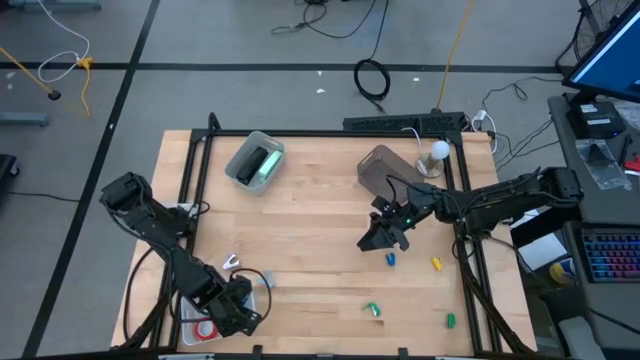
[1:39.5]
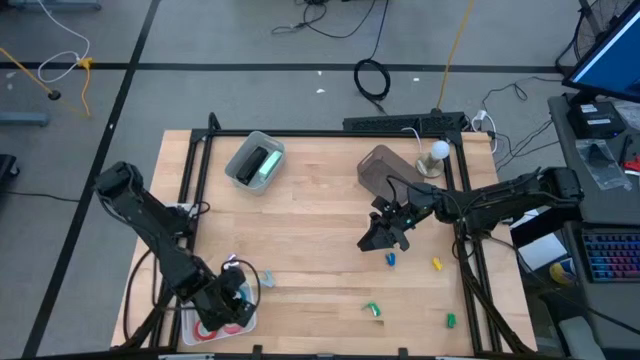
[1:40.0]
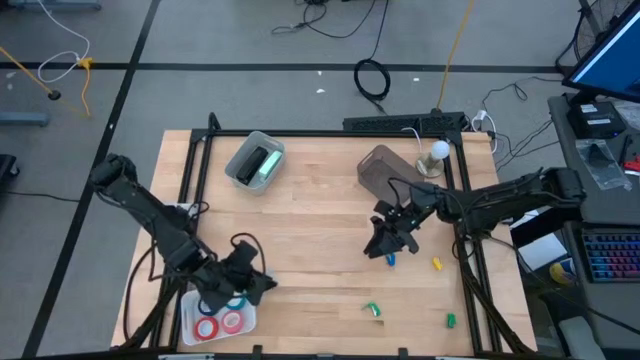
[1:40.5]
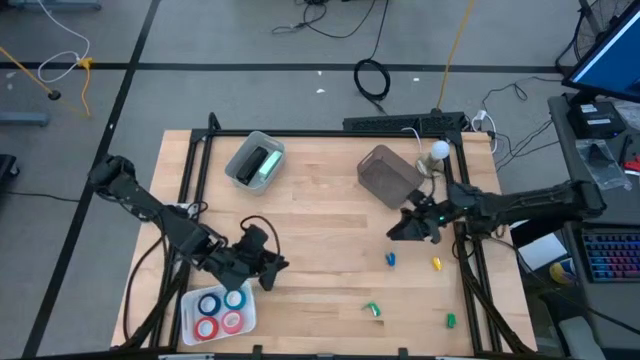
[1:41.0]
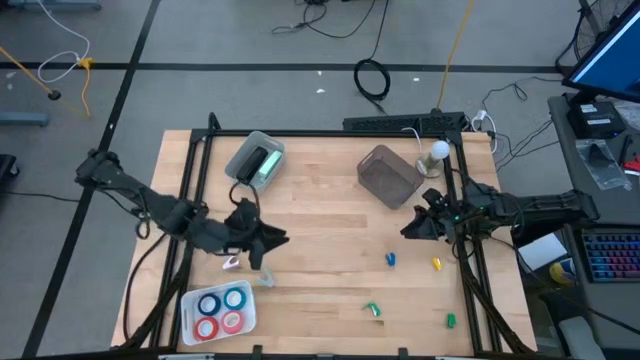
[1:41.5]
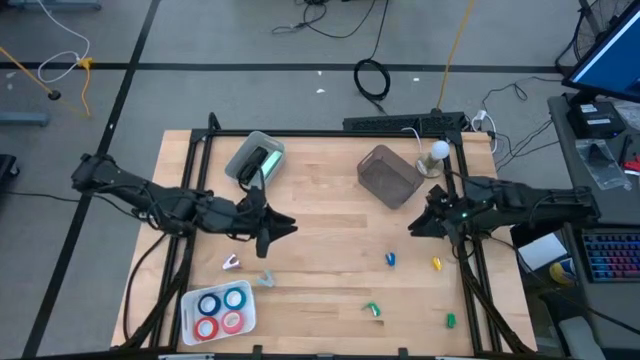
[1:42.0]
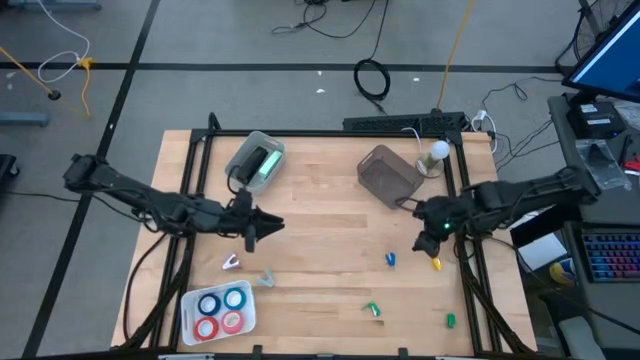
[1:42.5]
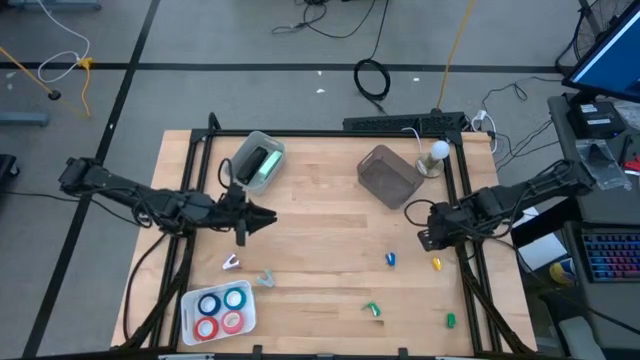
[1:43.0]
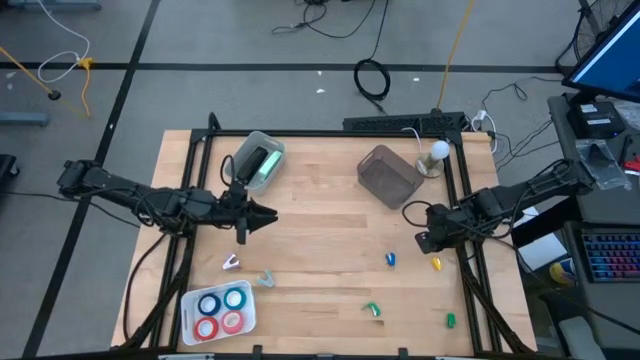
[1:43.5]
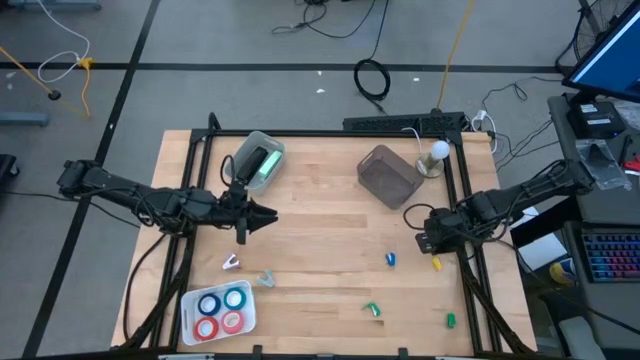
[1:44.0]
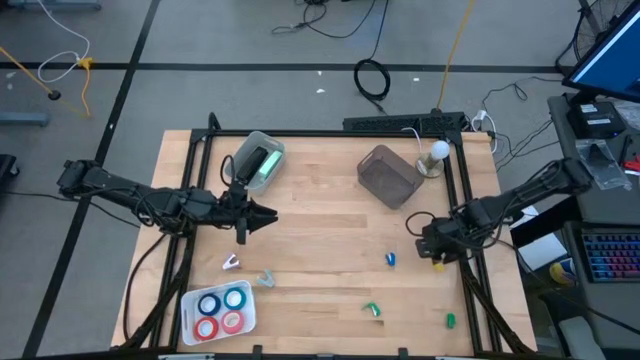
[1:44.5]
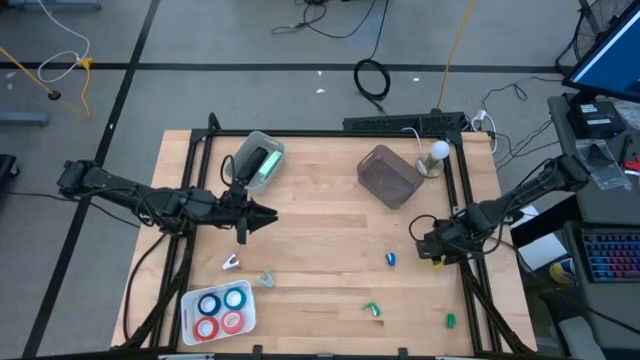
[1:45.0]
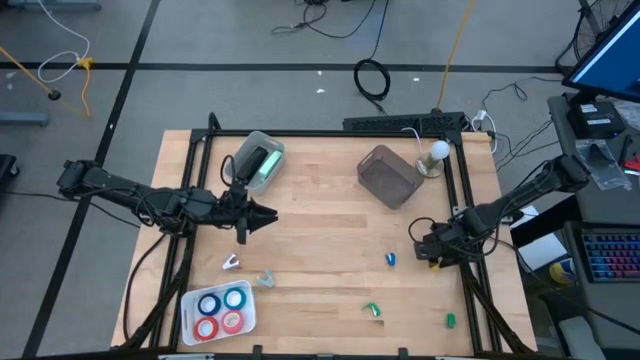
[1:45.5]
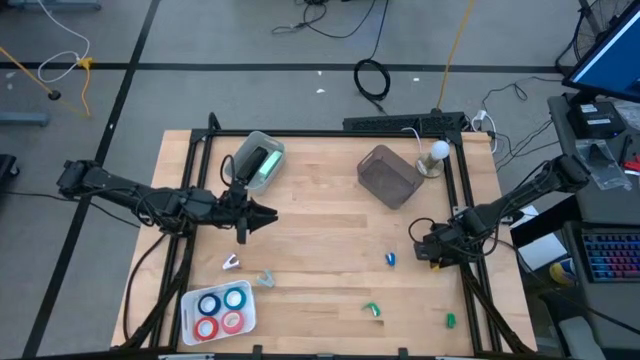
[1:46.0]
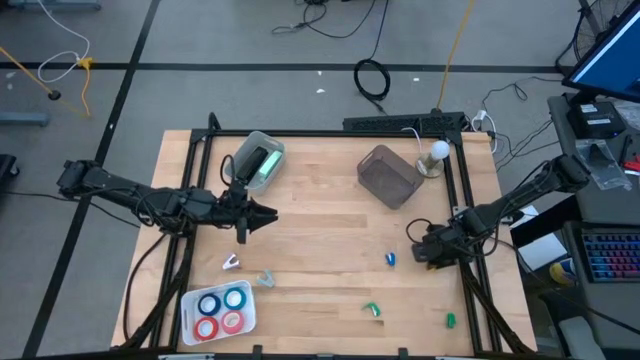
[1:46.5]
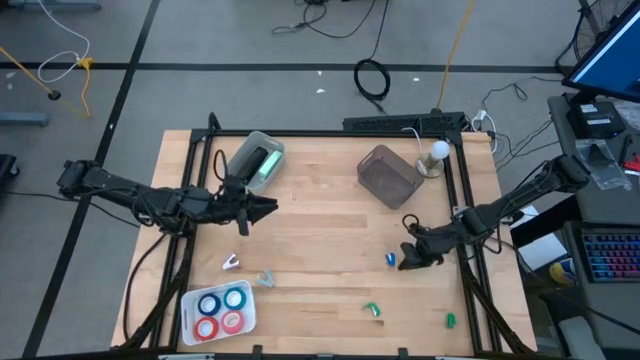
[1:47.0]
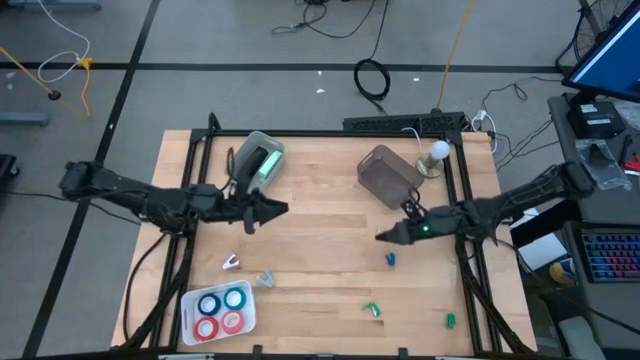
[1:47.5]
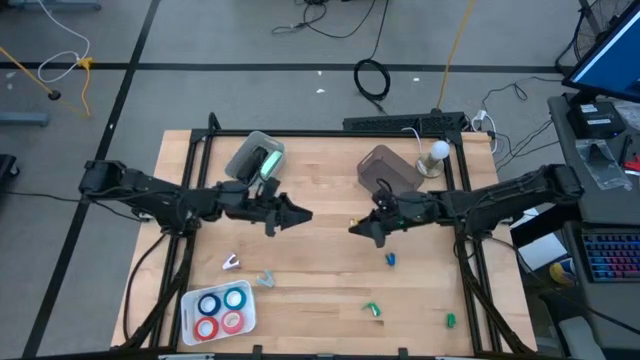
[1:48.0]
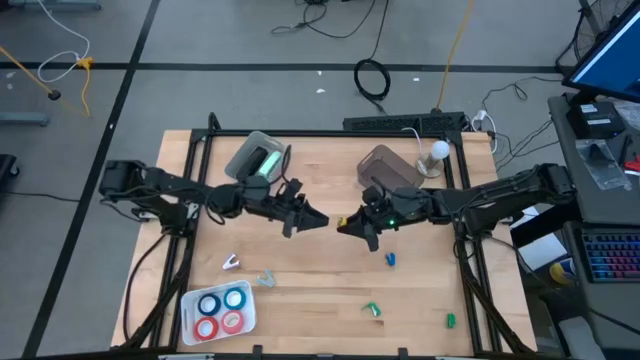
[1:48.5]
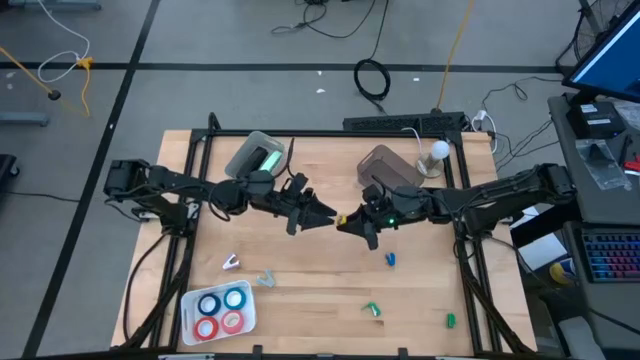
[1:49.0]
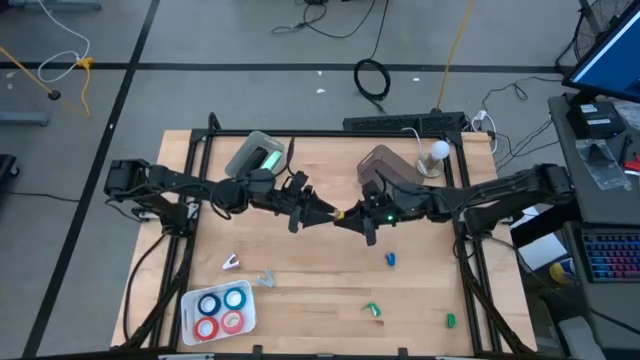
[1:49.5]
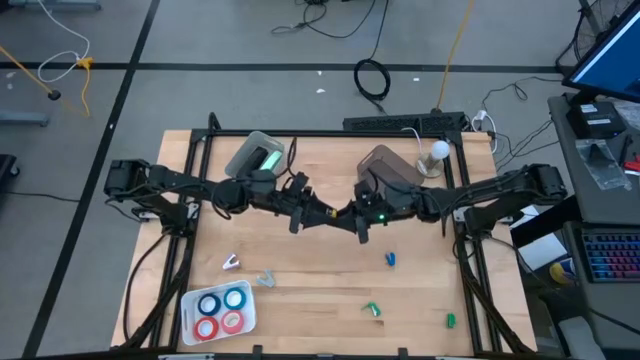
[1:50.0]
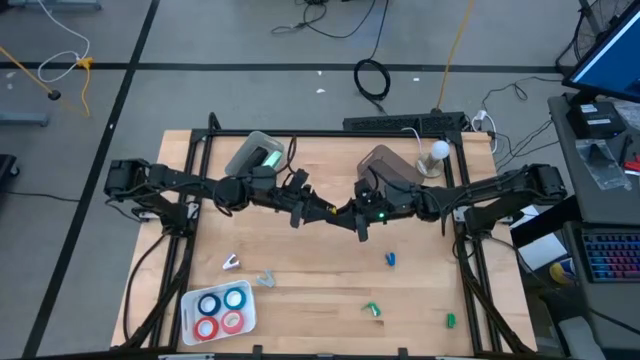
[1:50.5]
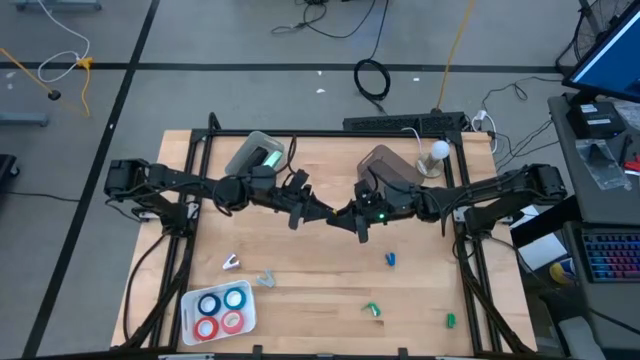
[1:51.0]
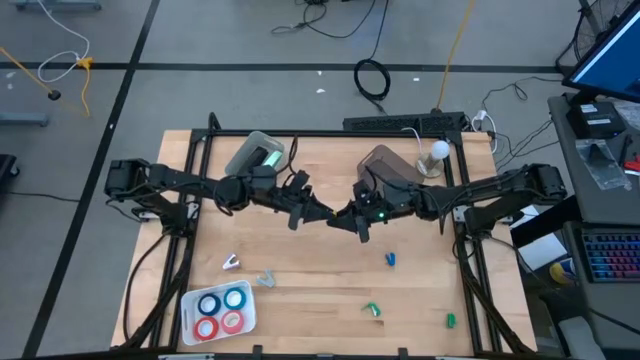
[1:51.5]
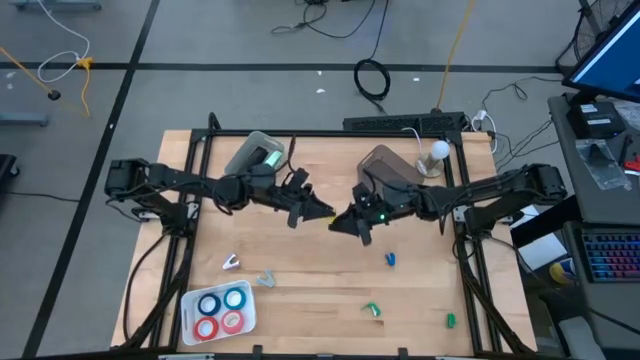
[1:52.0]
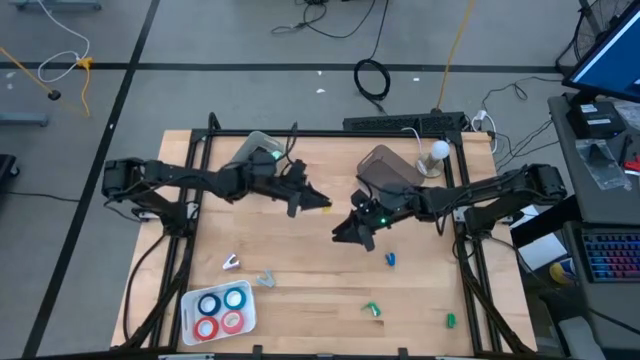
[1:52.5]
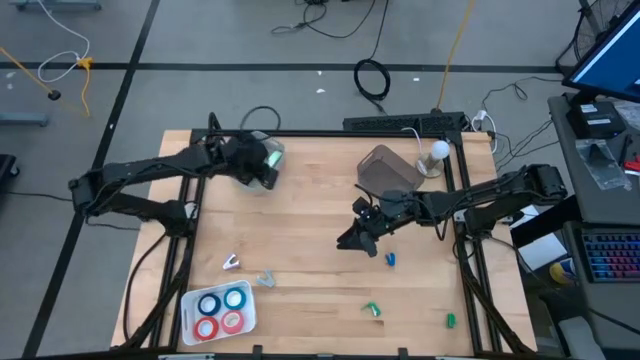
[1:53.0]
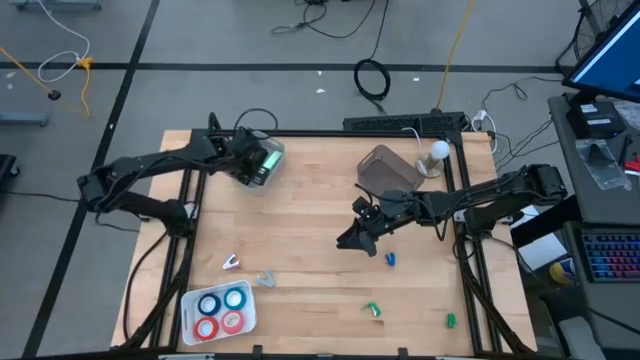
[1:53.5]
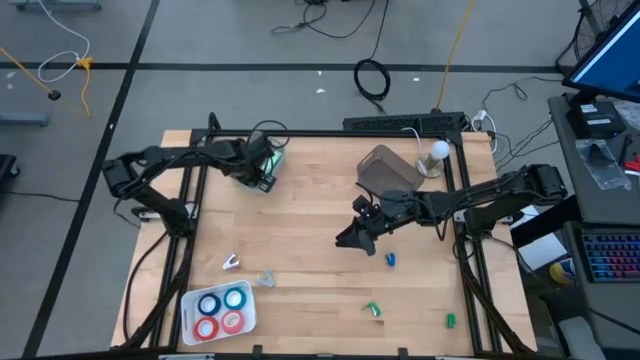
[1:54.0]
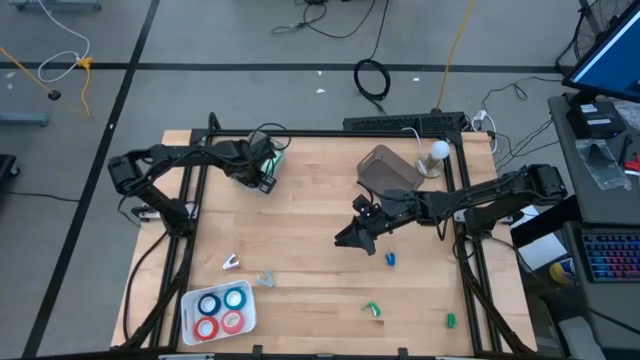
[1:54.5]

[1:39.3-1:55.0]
Task: Pick and place Stapler, Stapler remover, tape
Put the yellow stapler into the gray bin

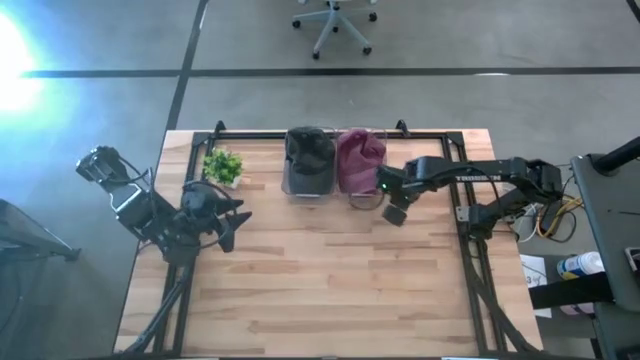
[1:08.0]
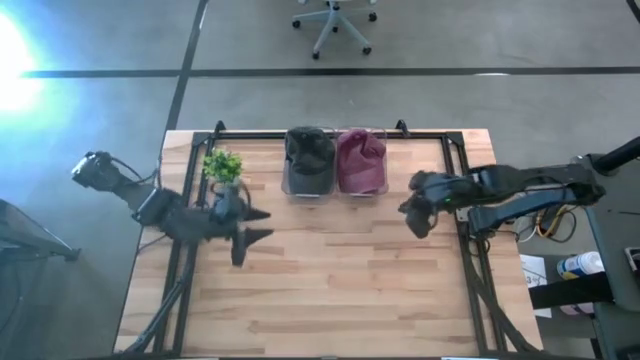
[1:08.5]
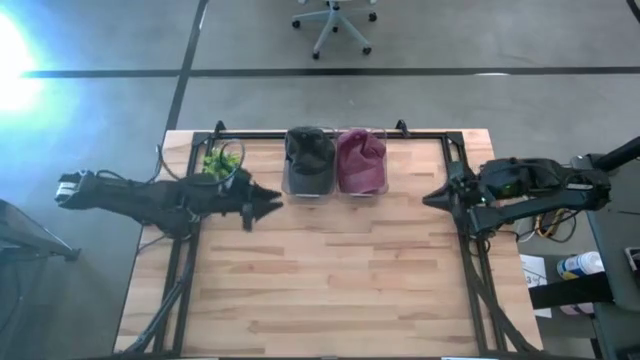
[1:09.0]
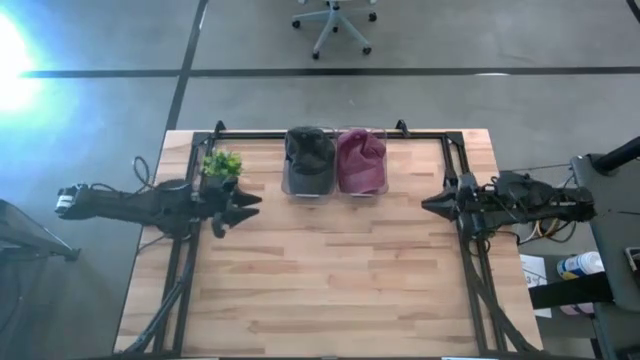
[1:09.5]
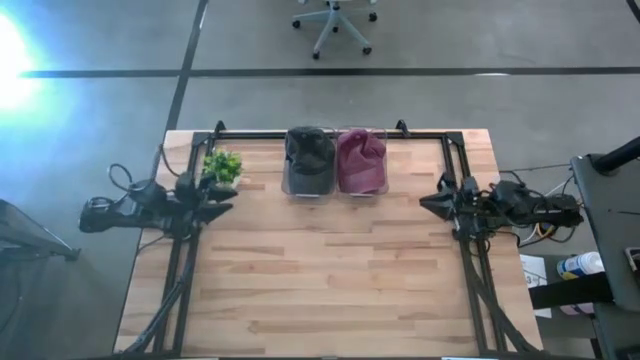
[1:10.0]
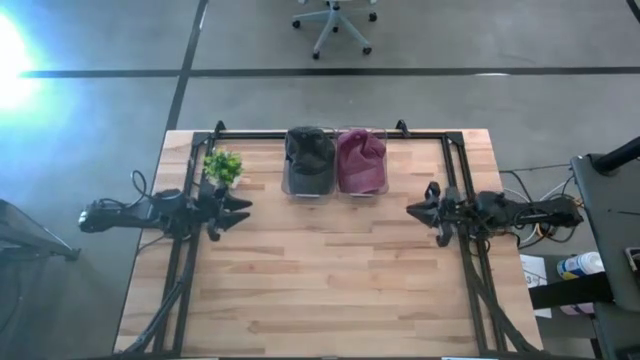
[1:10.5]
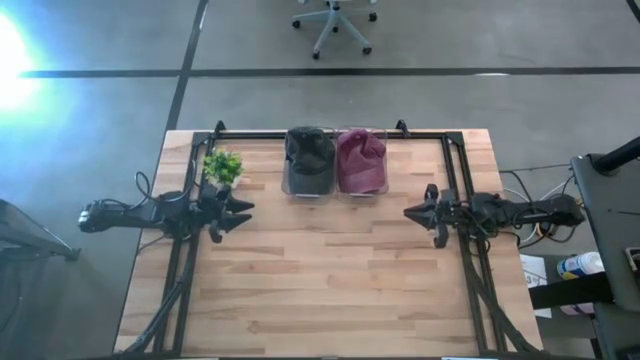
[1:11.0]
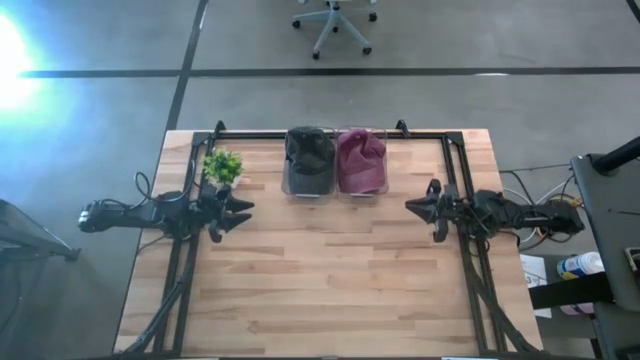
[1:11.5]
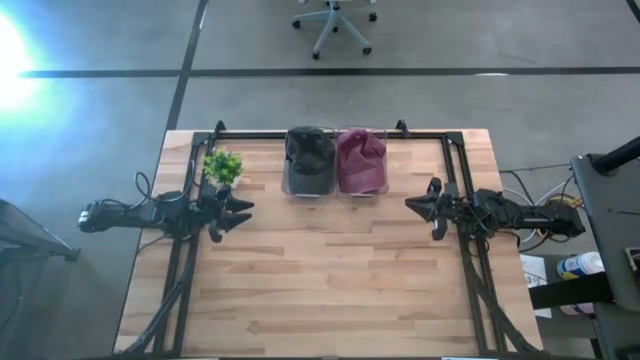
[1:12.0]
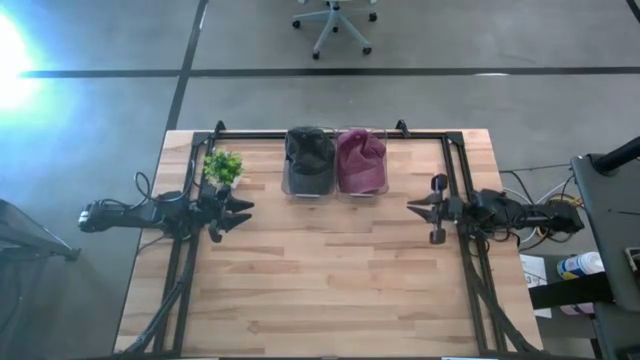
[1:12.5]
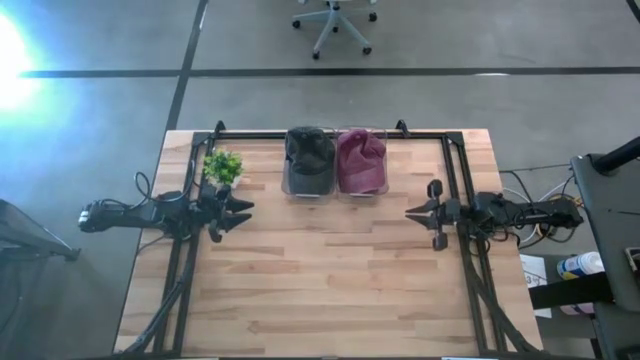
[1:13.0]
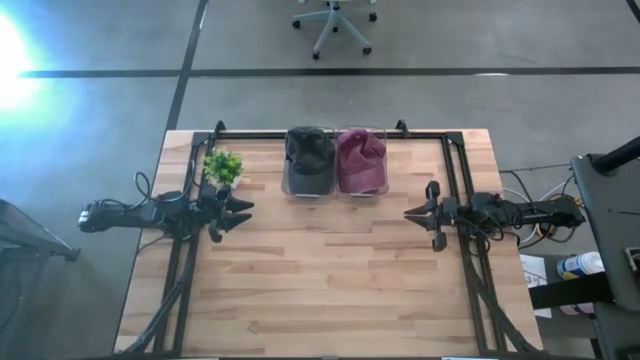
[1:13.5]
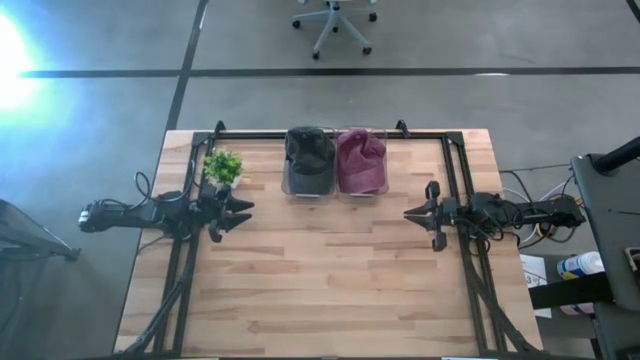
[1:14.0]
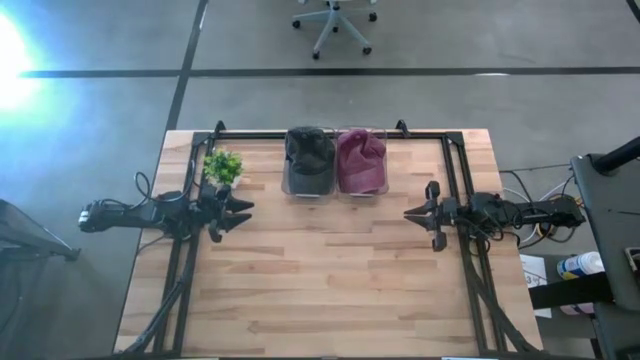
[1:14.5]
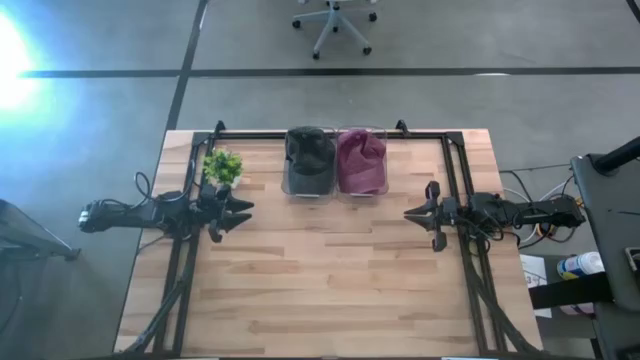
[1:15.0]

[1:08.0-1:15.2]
Task: Pick & Place hat
Return to Home Position
